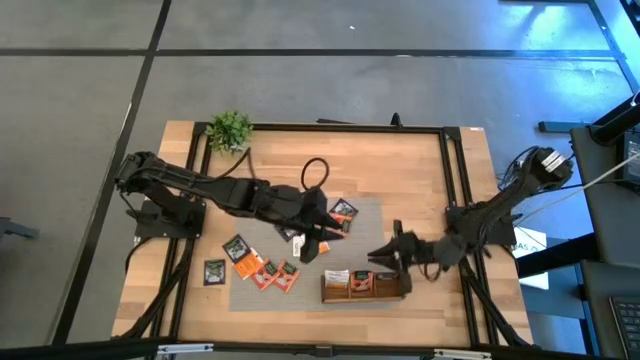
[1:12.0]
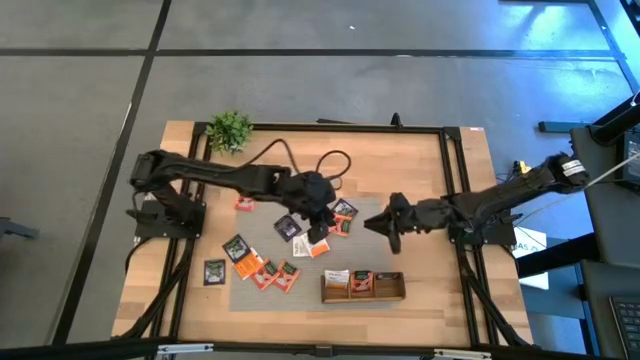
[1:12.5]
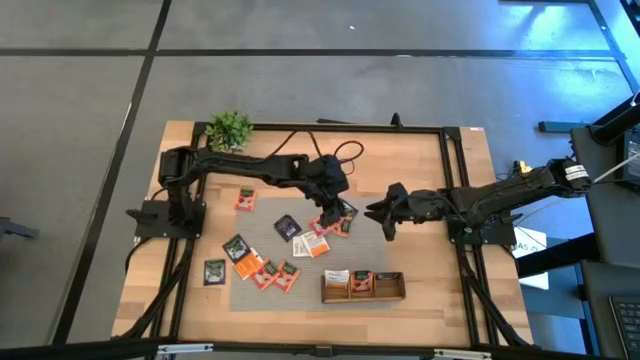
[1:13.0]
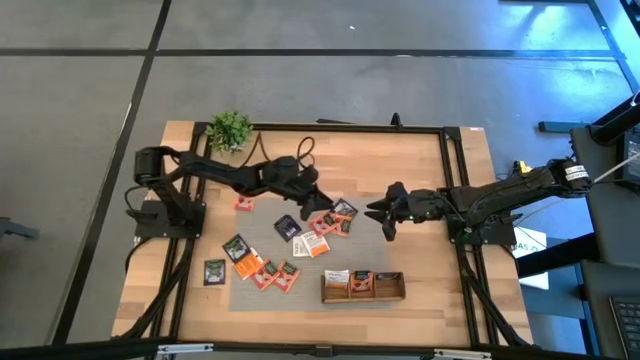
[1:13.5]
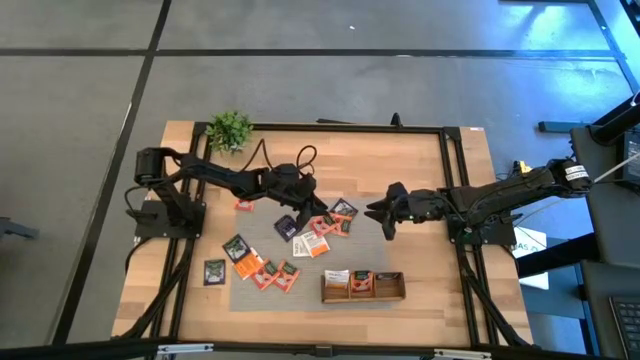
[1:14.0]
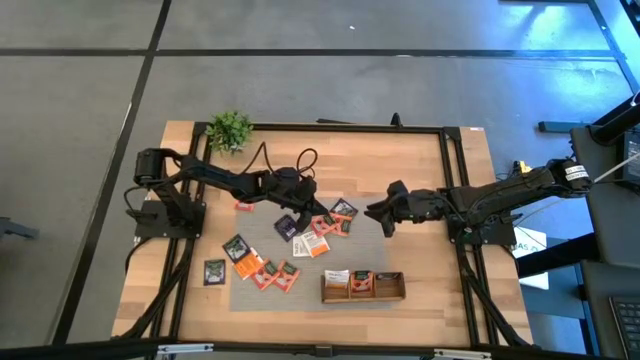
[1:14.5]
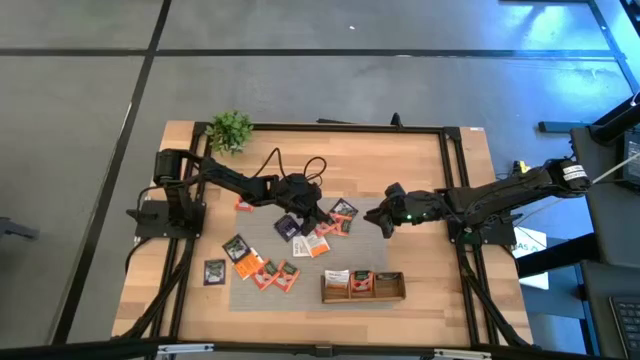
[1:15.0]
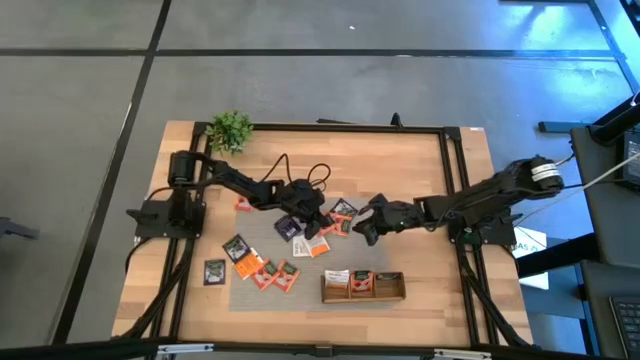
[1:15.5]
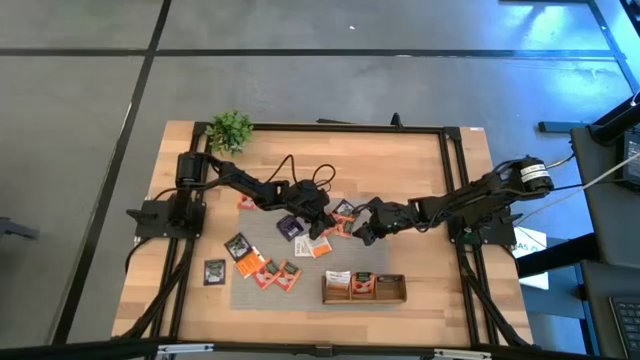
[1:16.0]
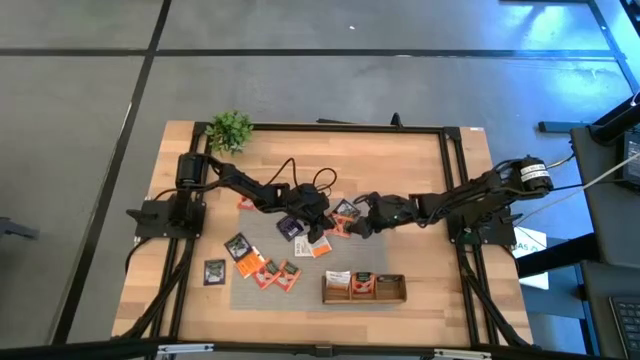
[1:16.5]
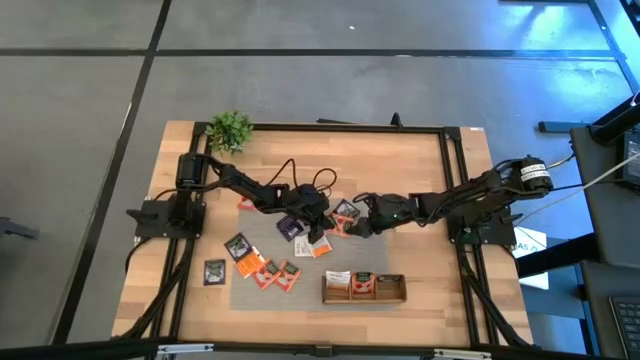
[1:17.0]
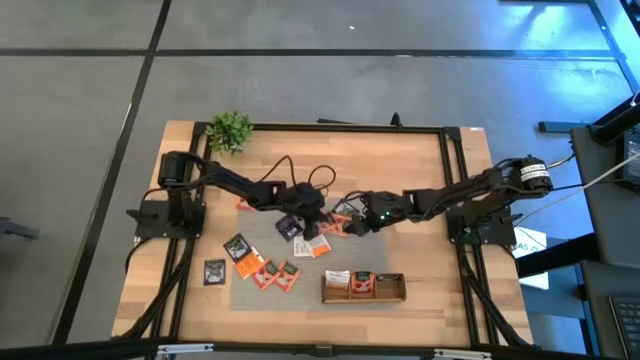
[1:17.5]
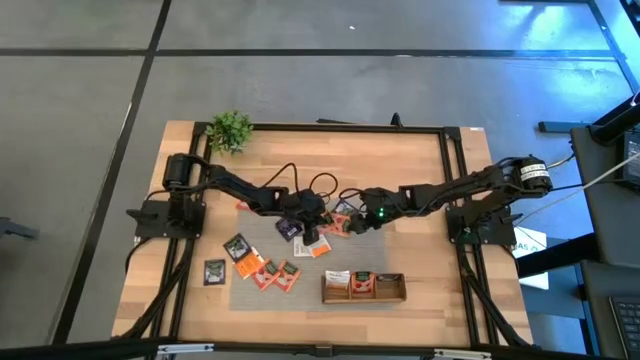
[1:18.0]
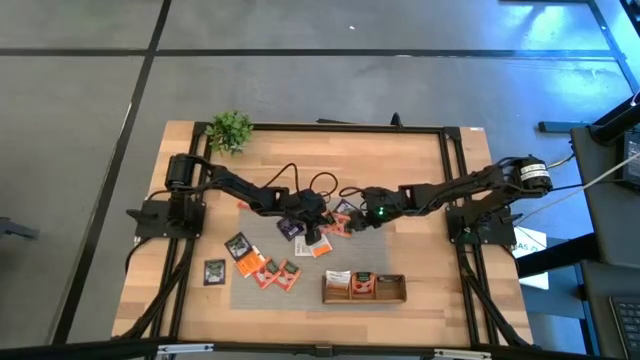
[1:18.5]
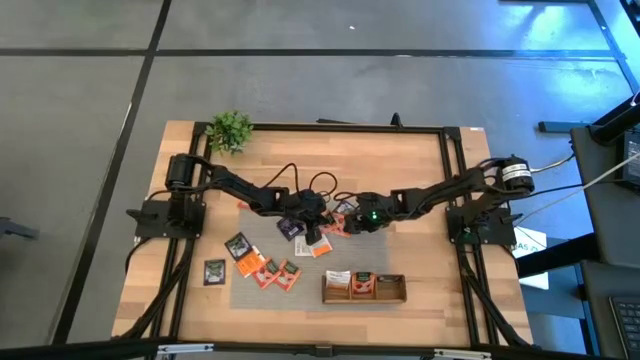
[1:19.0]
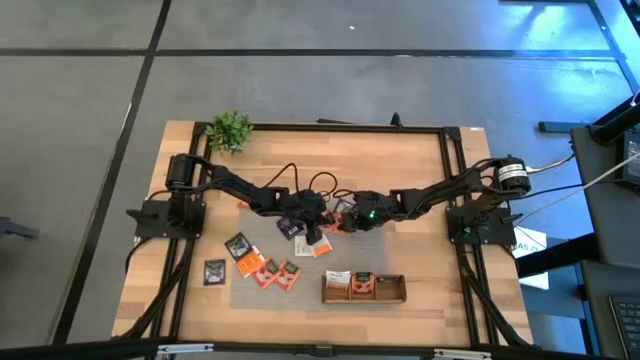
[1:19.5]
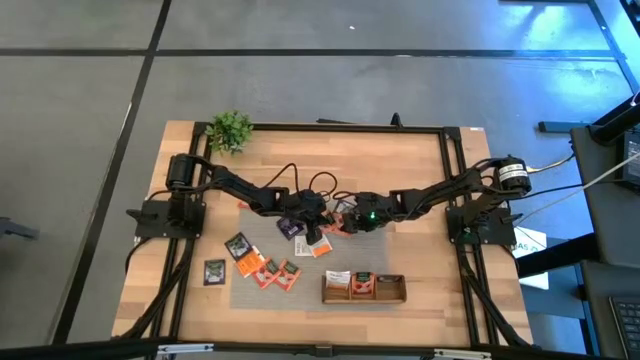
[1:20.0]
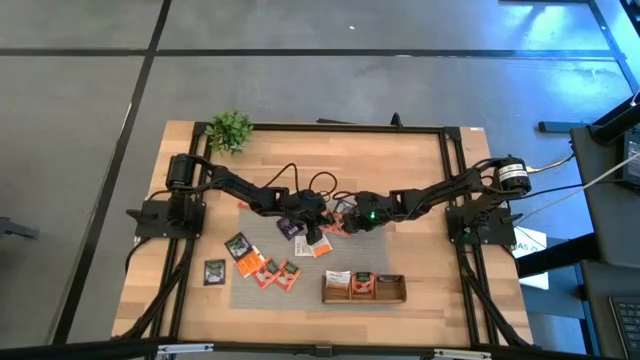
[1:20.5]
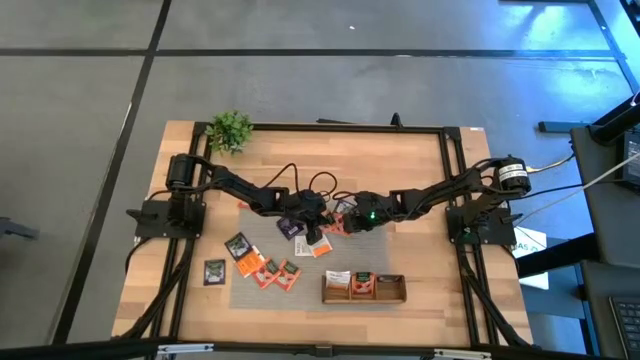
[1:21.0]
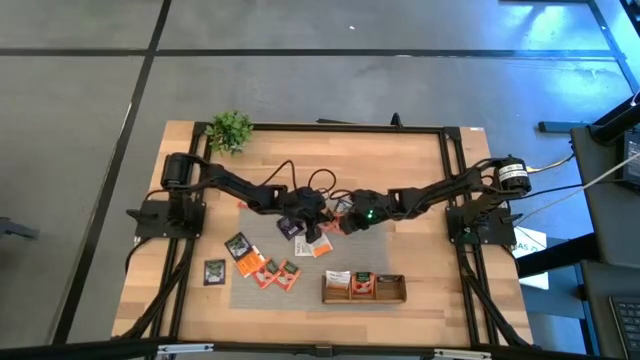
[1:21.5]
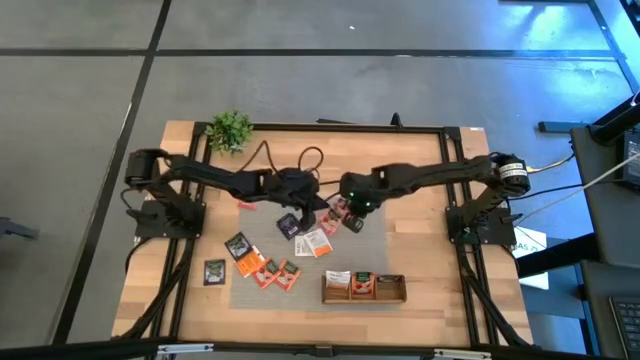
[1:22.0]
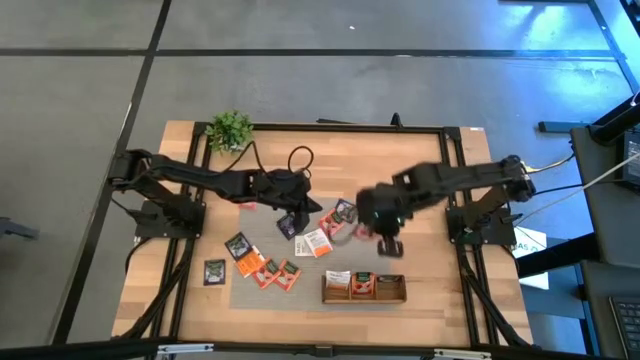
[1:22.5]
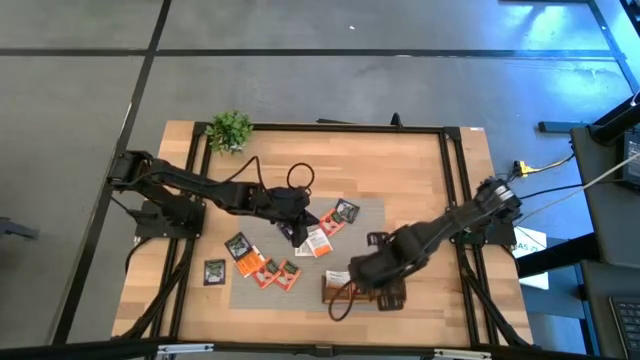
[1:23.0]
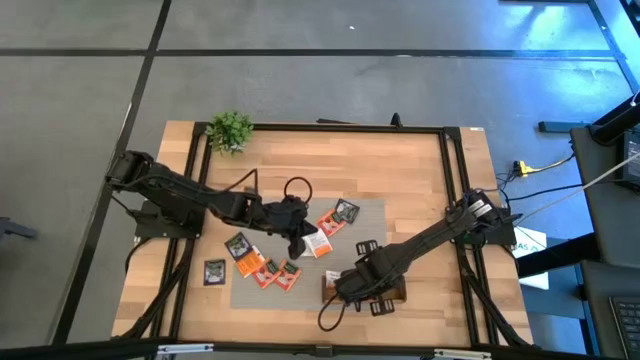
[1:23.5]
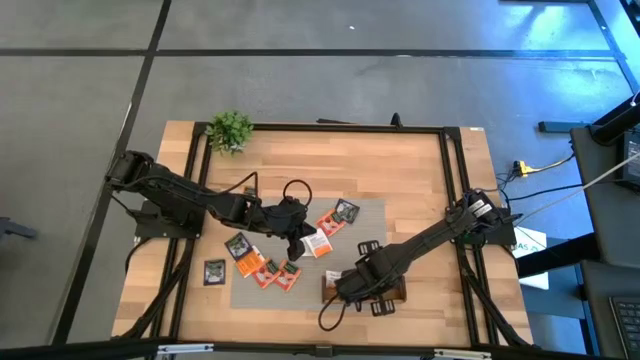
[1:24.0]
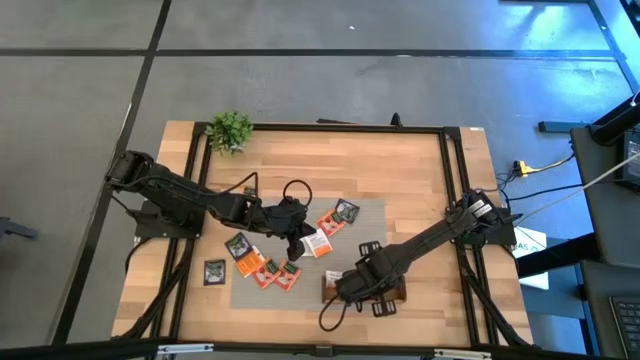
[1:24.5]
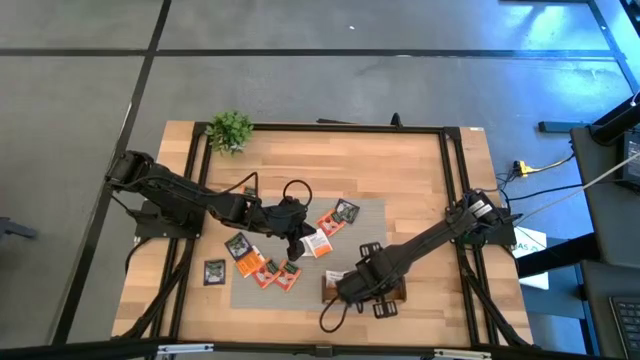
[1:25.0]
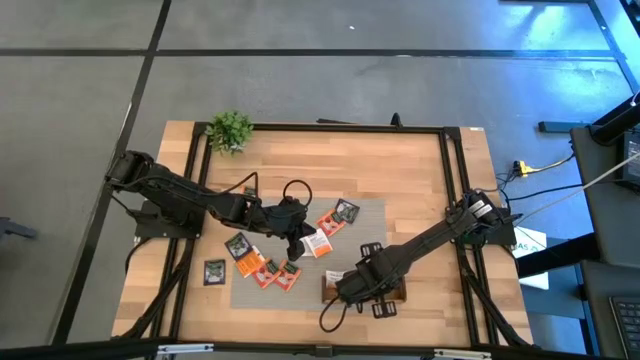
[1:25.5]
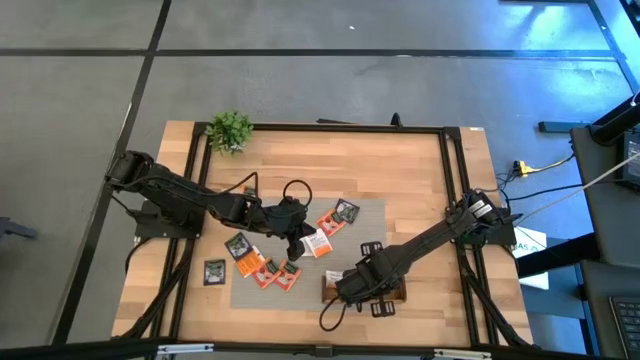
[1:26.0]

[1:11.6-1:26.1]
Task: Pick & Place Tea
Put the yellow tea bag into the middle compartment of the wooden organizer

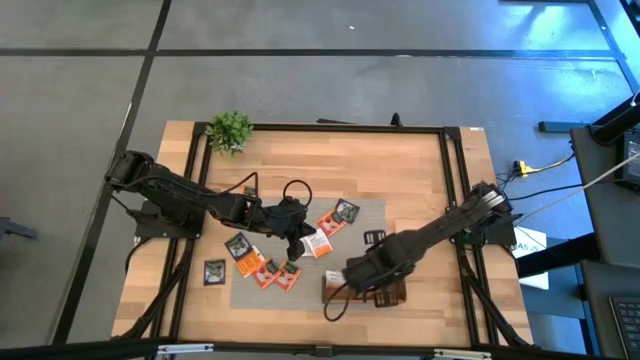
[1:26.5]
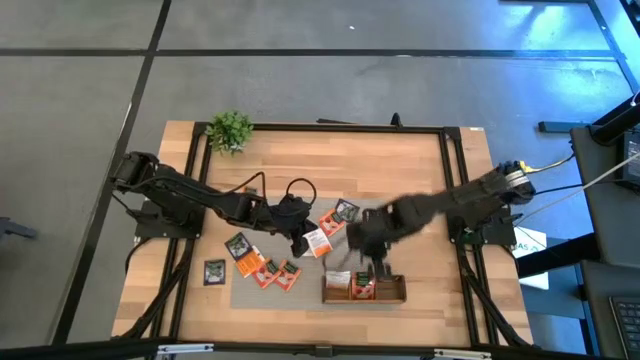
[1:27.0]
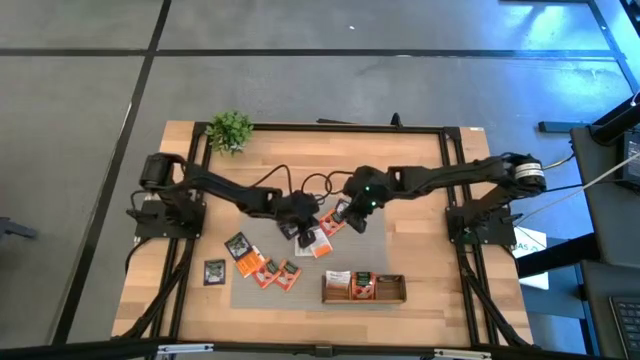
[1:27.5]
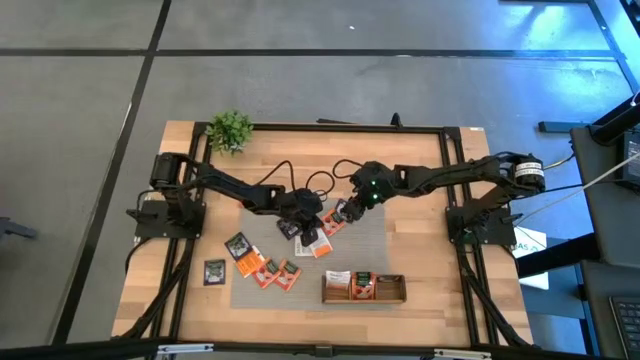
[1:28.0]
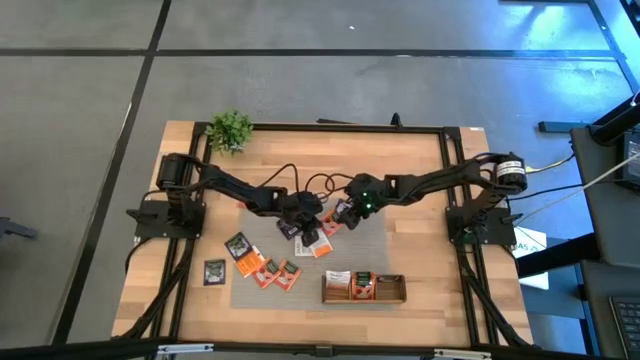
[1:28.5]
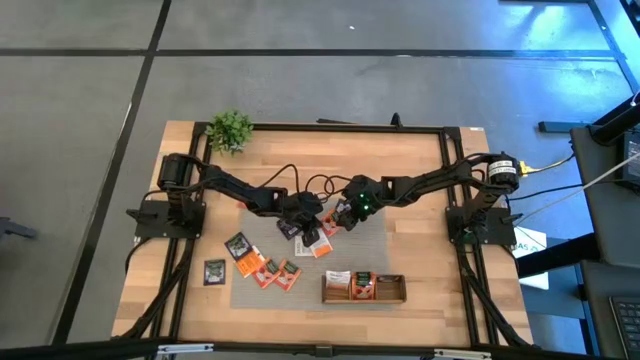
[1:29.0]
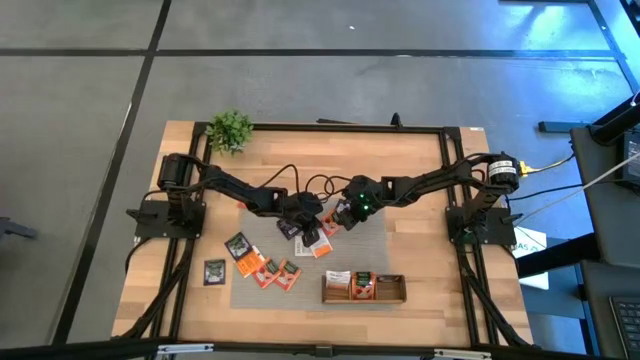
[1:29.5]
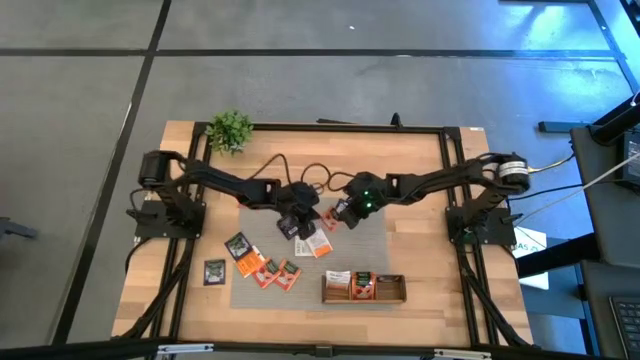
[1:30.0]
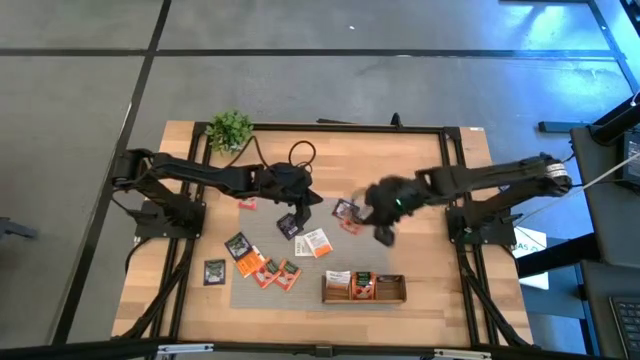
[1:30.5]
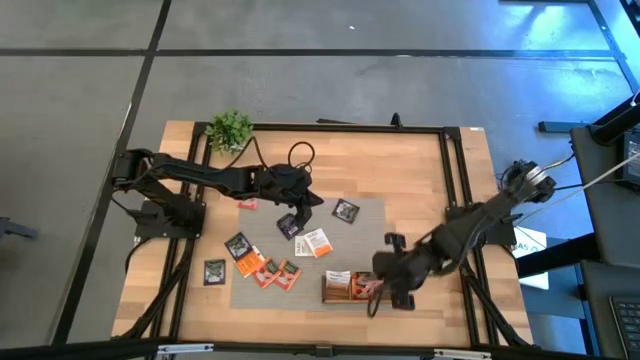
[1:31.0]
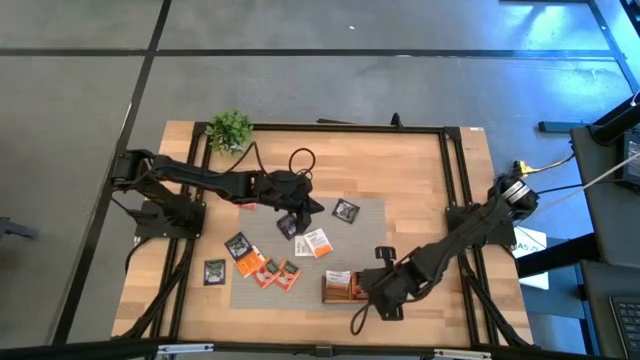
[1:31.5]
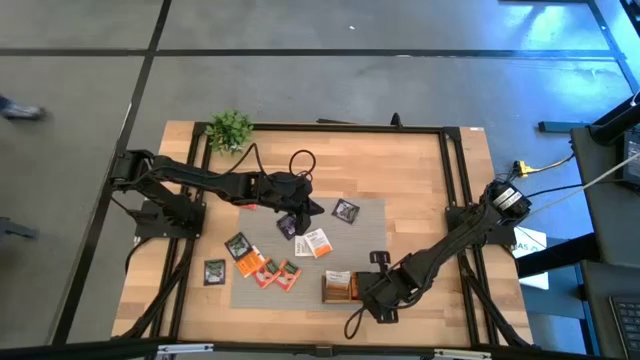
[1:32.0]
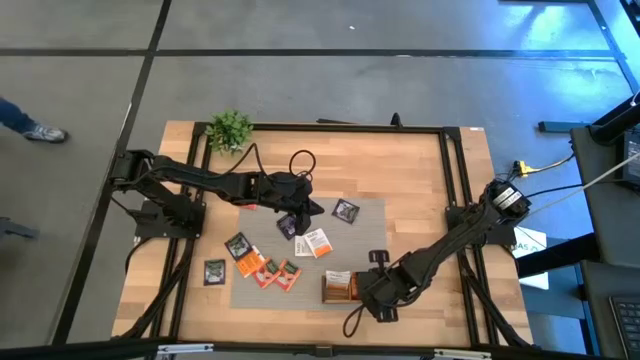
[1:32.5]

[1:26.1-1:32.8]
Put the yellow tea bag into the middle compartment of the wooden organizer
